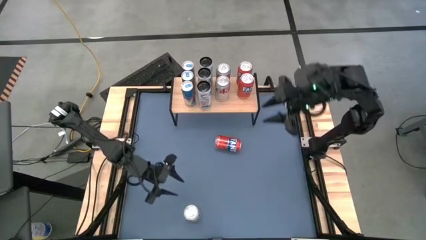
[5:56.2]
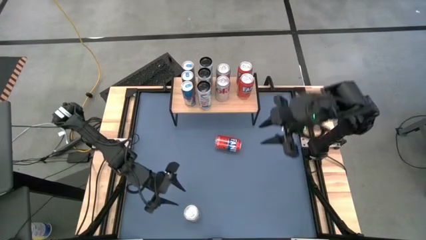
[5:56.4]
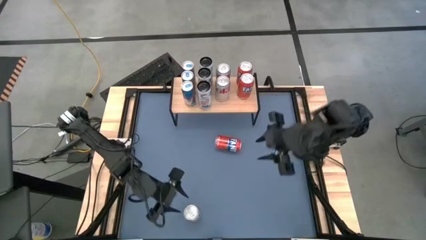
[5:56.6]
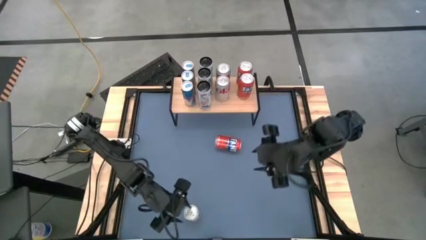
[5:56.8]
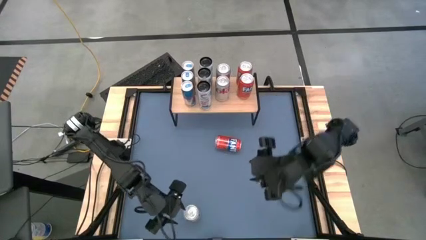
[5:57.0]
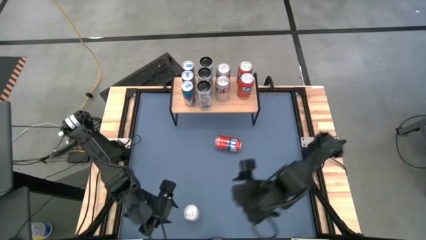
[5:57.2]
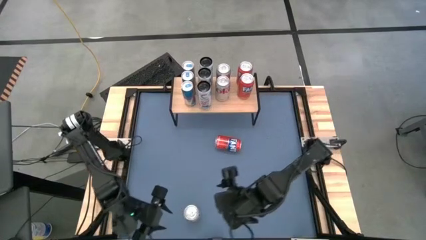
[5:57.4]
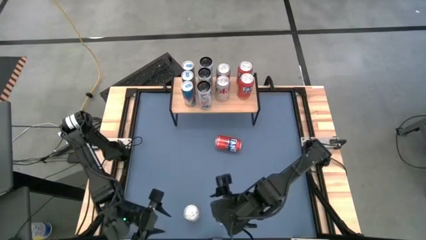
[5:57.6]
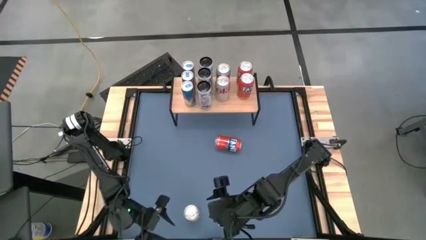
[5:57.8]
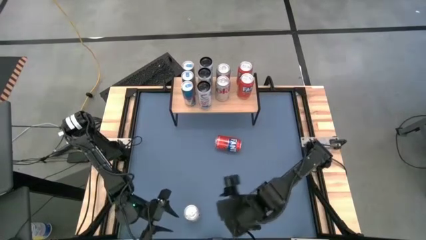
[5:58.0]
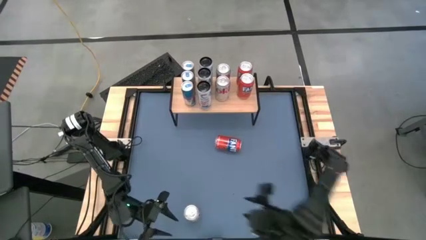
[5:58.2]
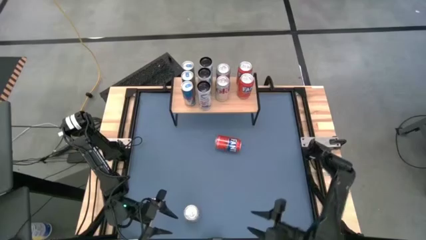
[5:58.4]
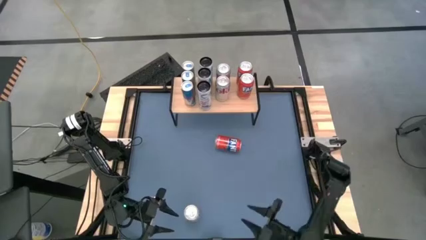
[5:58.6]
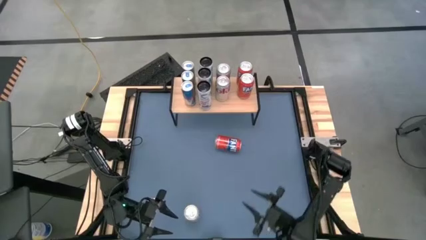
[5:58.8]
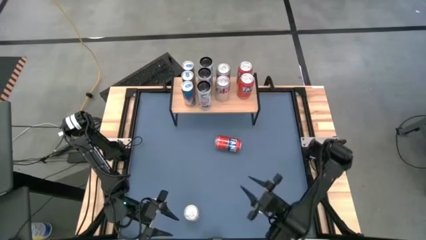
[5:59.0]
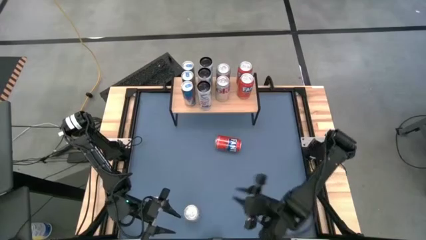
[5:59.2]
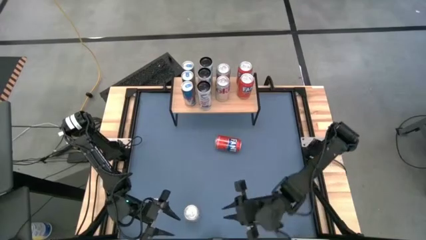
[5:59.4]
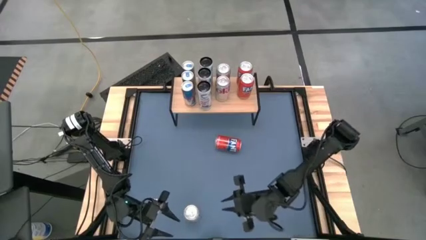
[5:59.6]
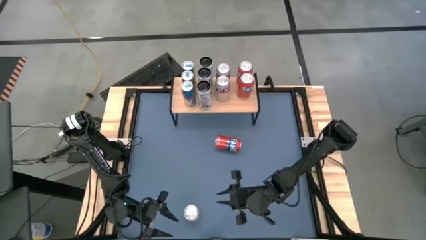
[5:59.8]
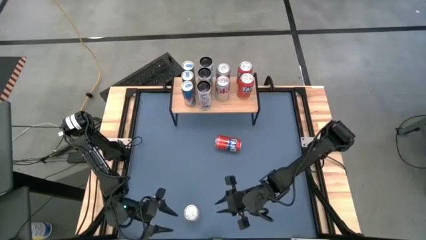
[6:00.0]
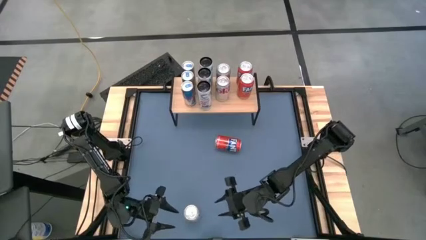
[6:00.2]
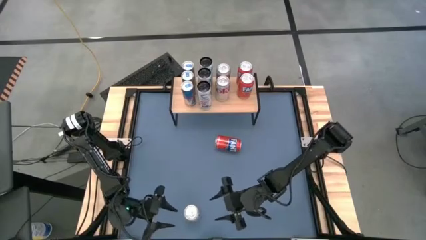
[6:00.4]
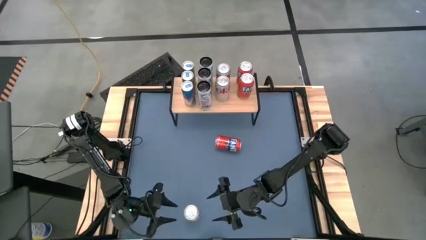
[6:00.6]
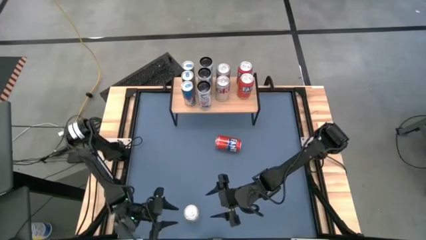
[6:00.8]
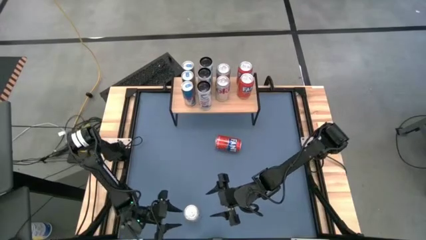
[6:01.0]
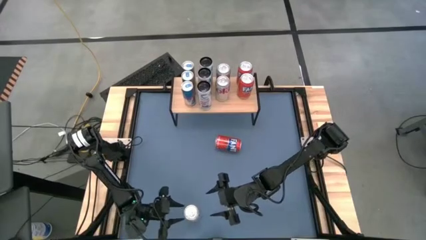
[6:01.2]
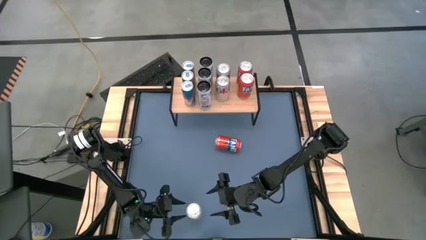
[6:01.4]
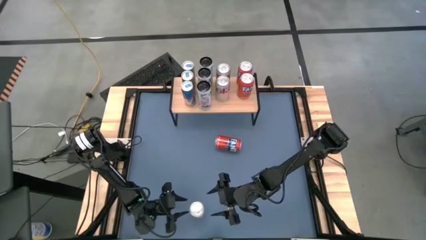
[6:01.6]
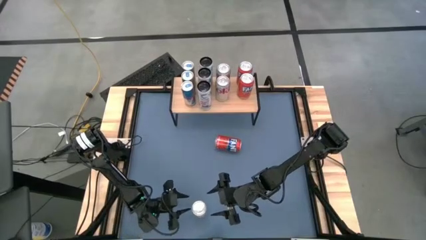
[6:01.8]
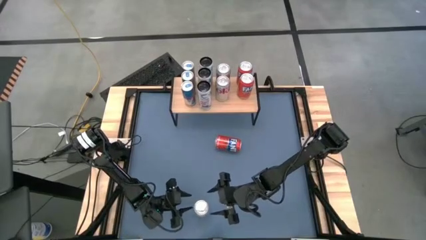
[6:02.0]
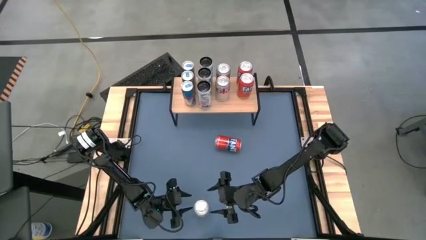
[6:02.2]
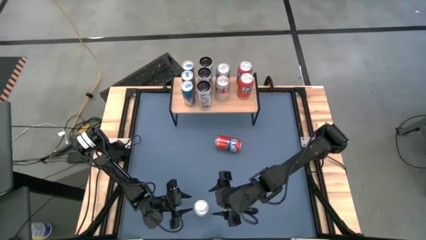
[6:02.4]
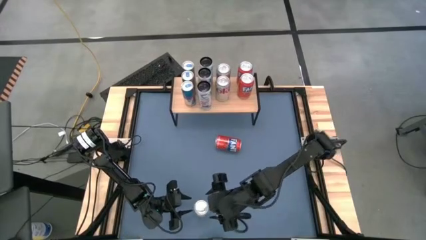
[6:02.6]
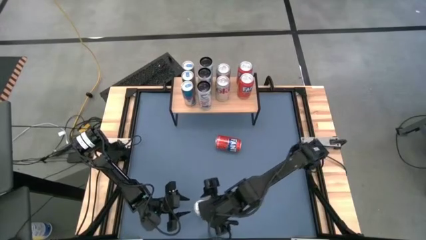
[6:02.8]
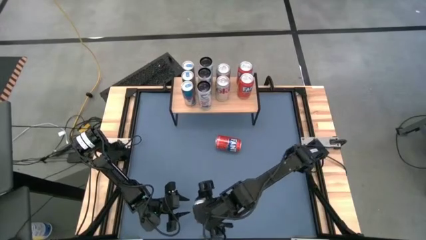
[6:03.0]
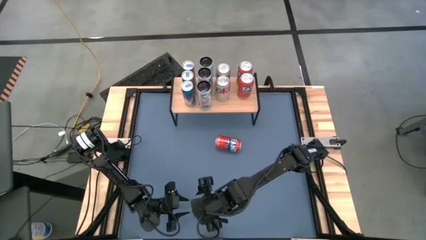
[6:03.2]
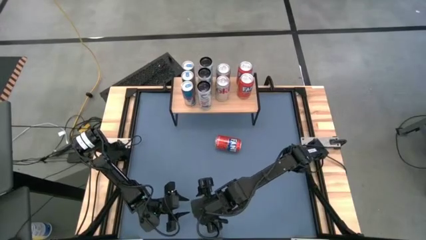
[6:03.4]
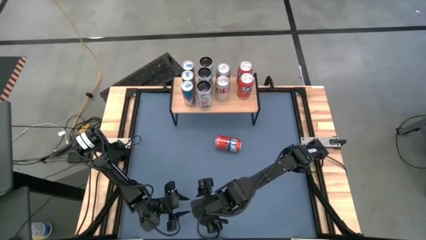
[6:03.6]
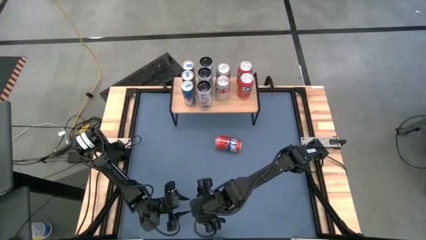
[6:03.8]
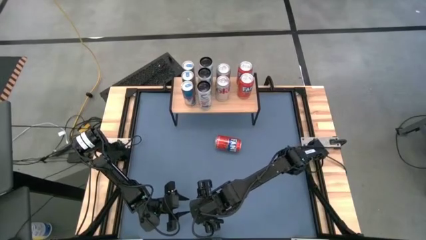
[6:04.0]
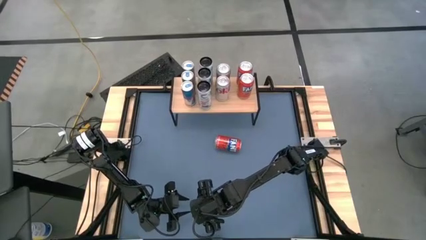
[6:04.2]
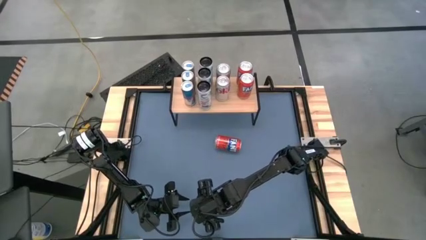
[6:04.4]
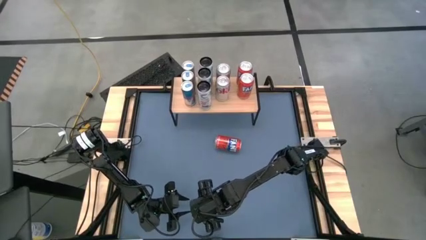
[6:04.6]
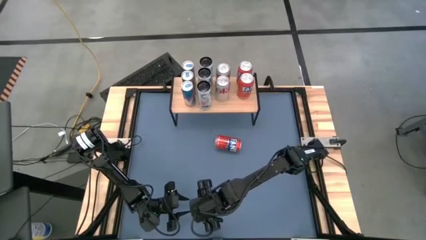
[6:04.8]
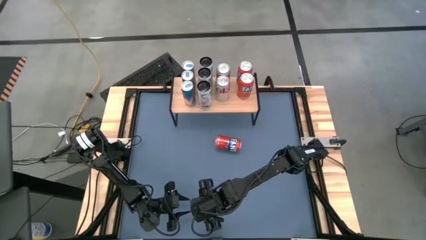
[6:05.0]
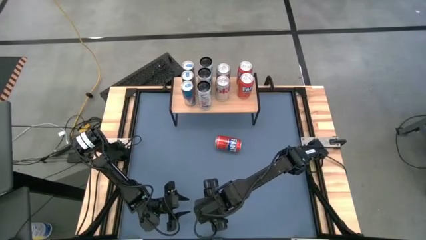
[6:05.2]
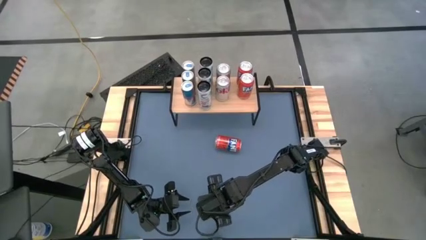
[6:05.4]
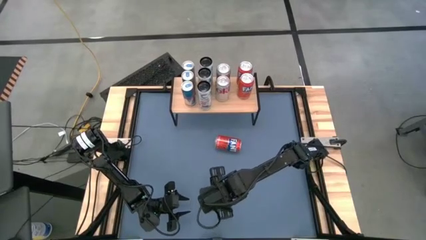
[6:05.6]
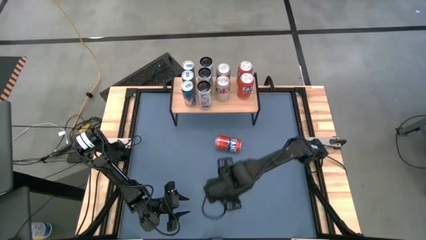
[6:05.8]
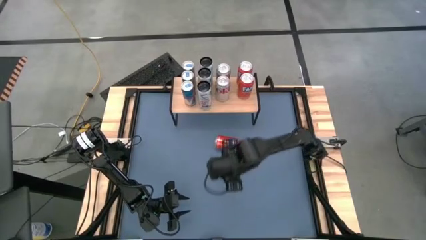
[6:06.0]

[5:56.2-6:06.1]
Task: Place canned beverage on shelf
Put the silver soda can on the shelf aligned with the other silver soda can
